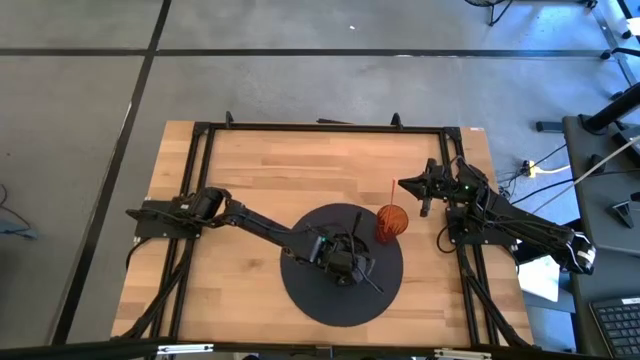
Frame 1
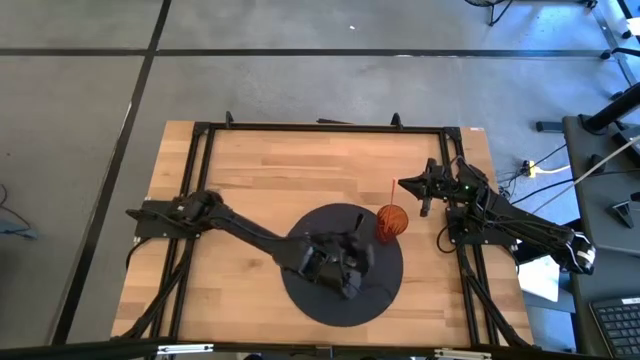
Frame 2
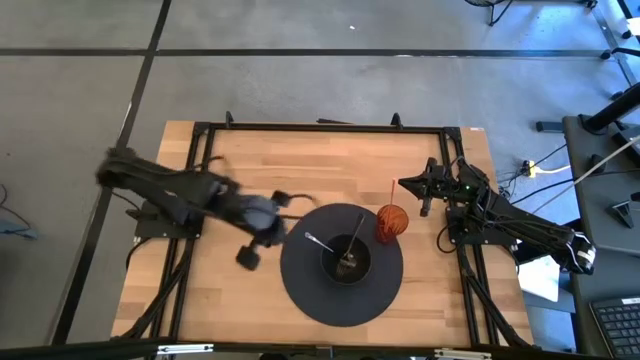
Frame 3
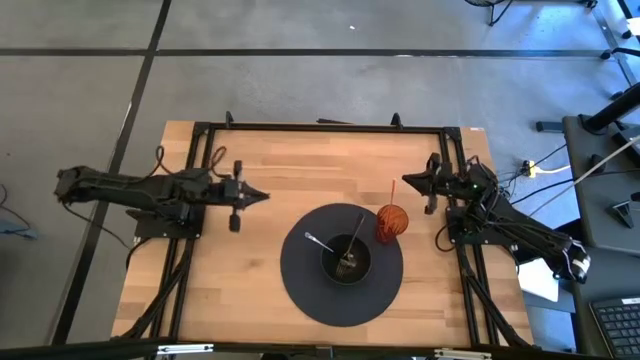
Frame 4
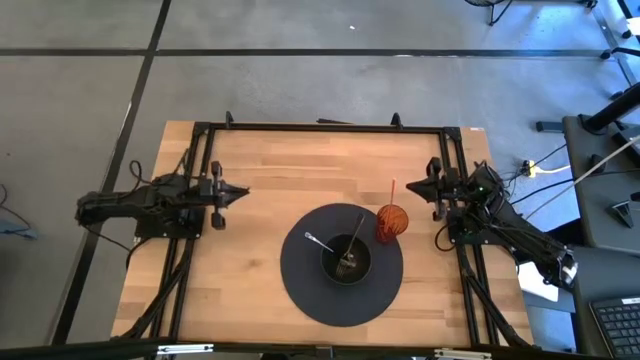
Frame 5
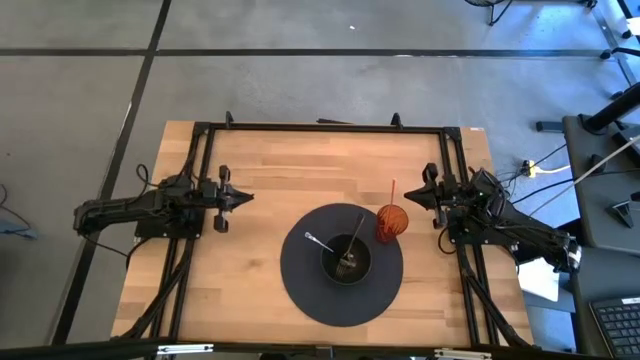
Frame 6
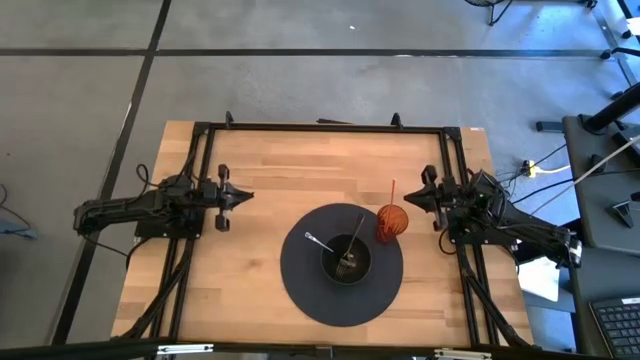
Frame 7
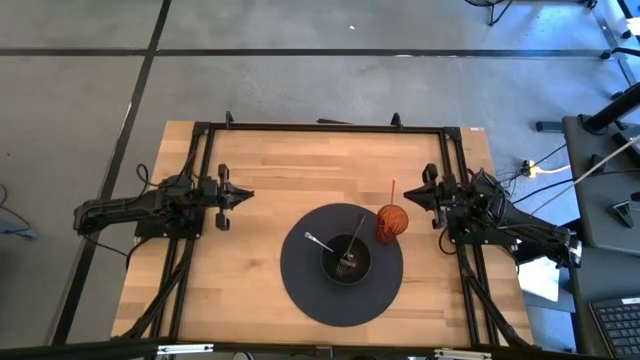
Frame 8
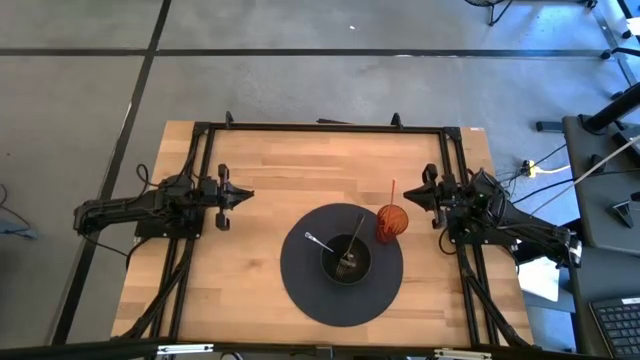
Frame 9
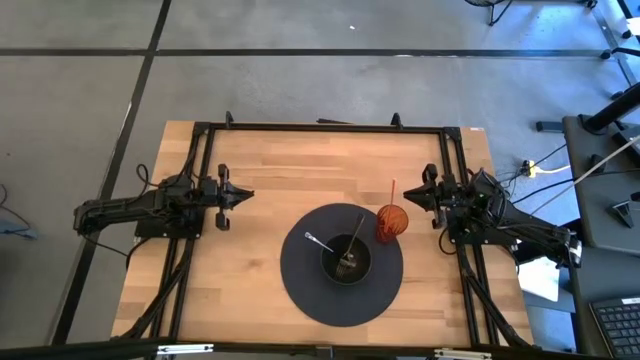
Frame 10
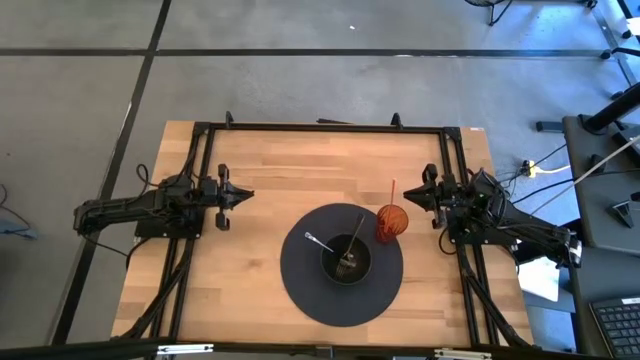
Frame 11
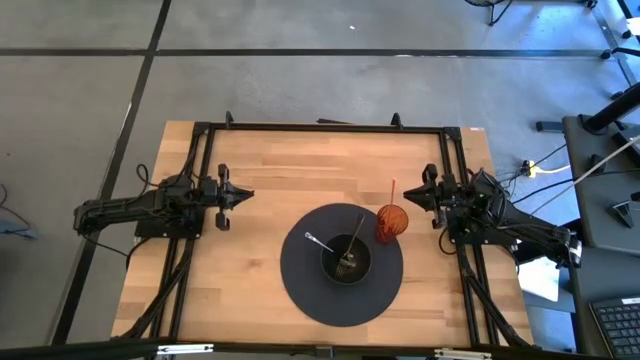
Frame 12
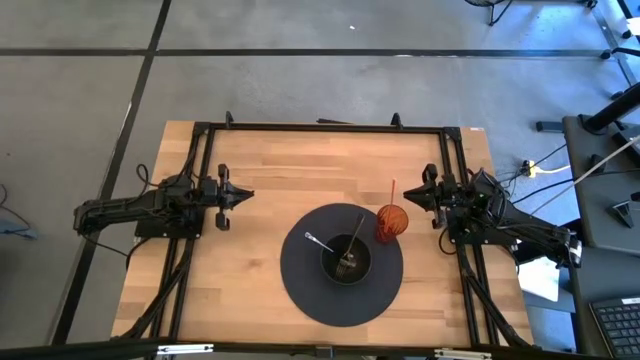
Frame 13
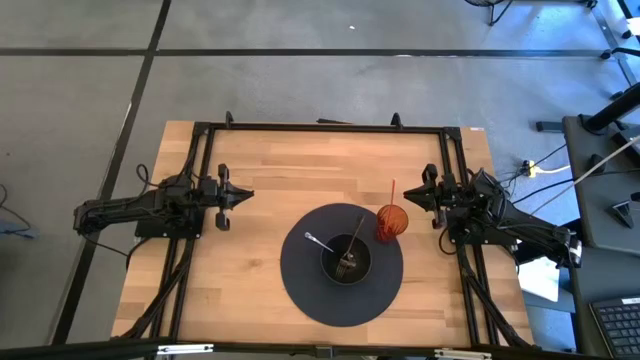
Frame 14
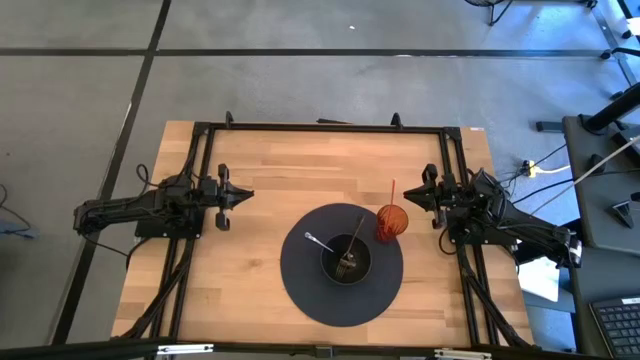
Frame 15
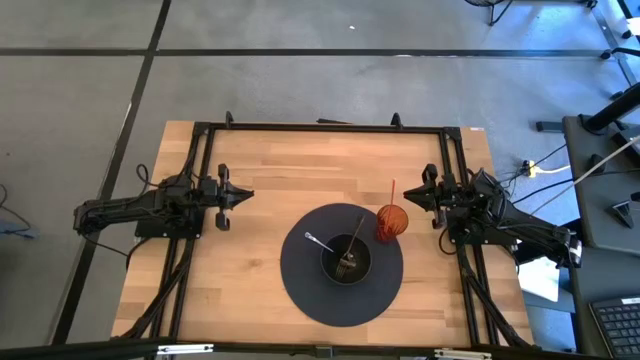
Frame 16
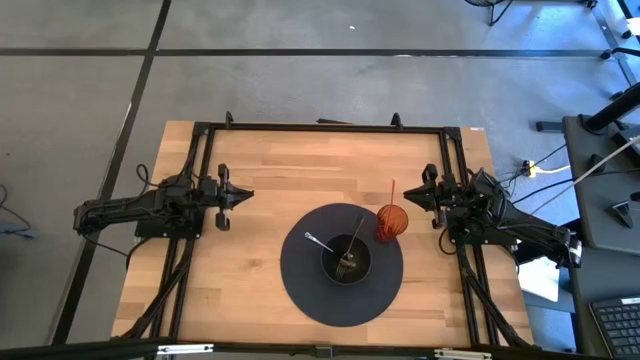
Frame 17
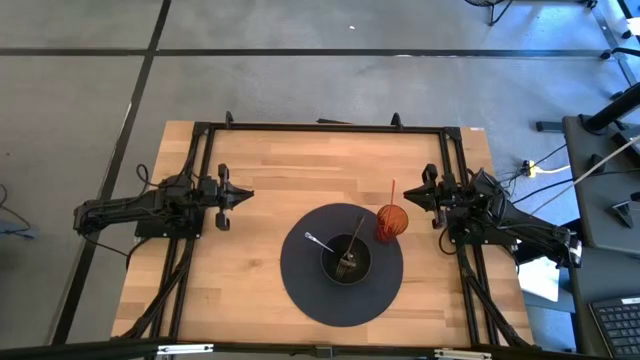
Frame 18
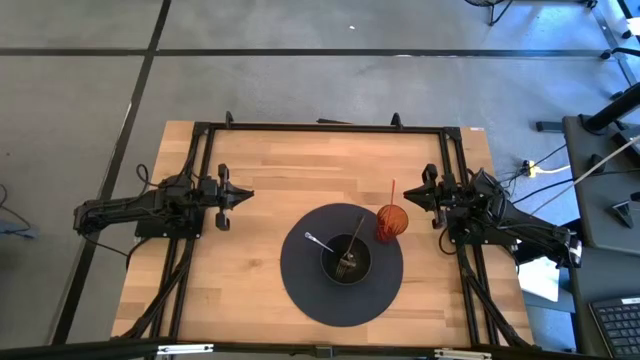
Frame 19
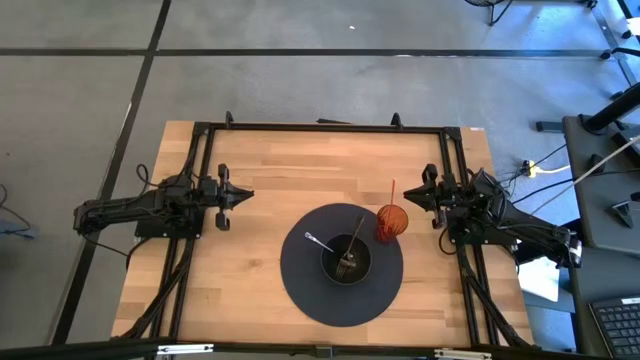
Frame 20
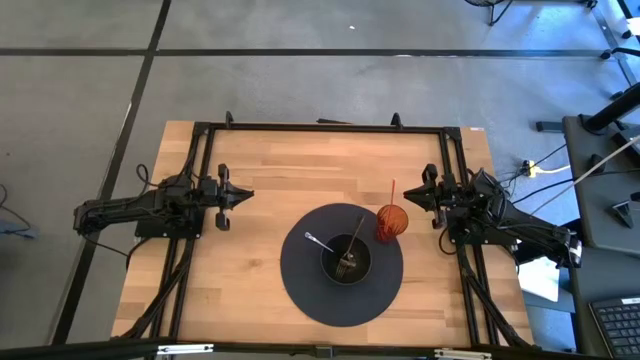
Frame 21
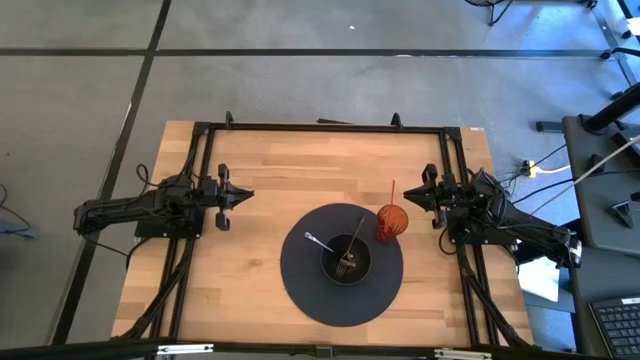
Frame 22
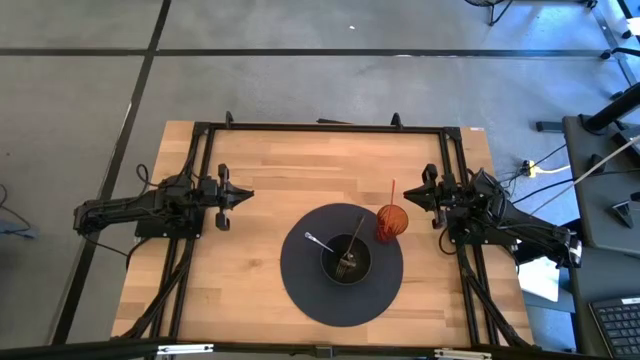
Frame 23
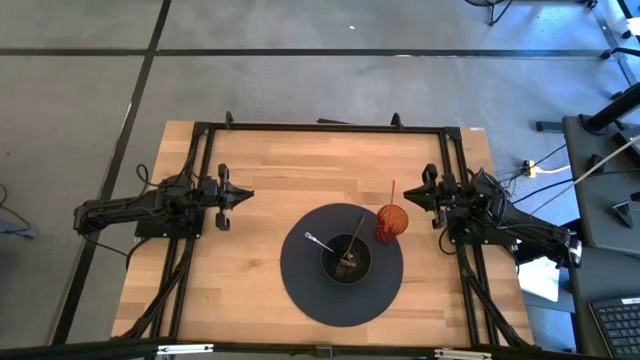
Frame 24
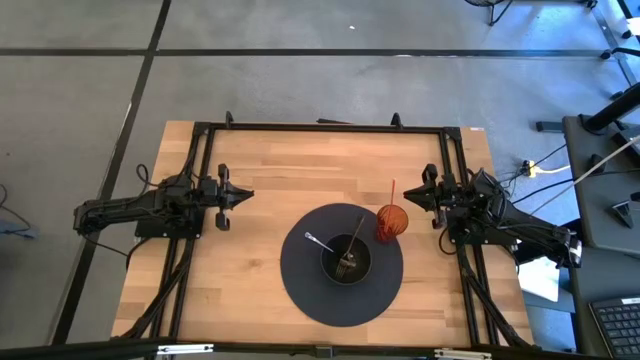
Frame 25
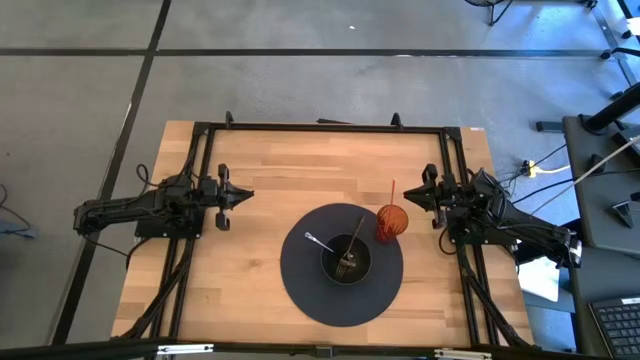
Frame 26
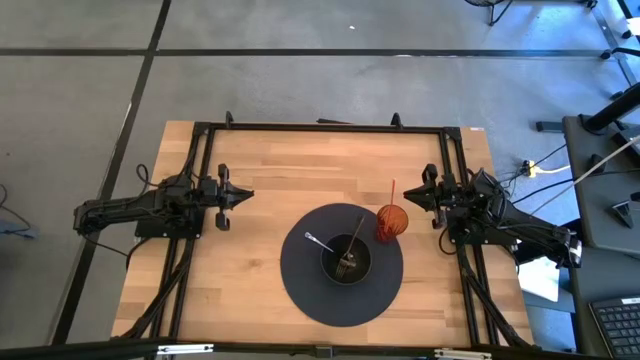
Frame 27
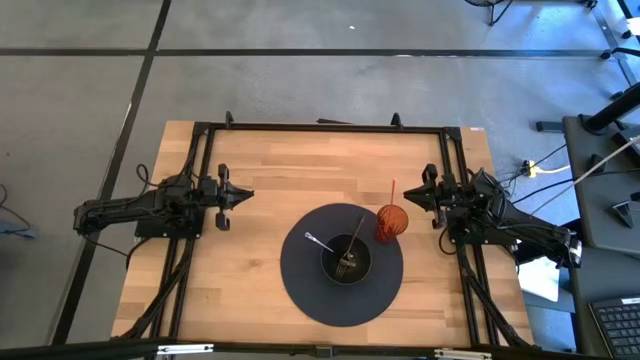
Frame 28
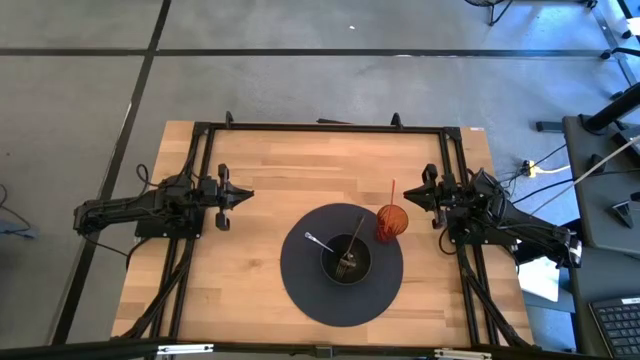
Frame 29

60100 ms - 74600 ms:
Task: Pick & Place Utensil
Return to Home Position

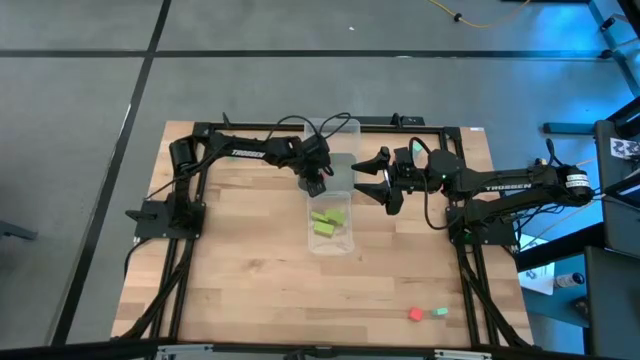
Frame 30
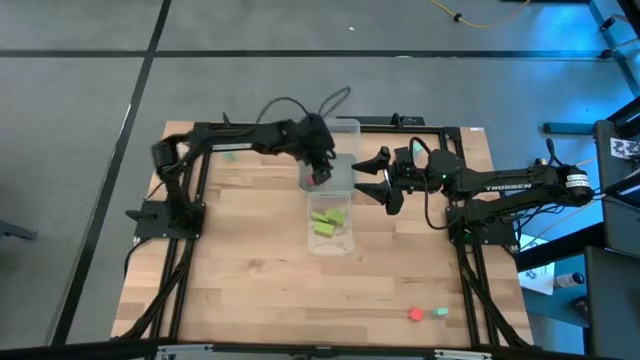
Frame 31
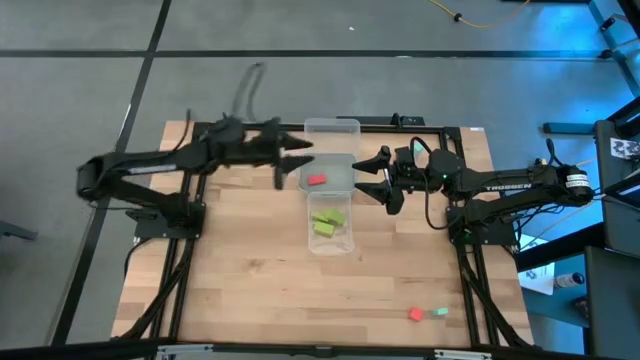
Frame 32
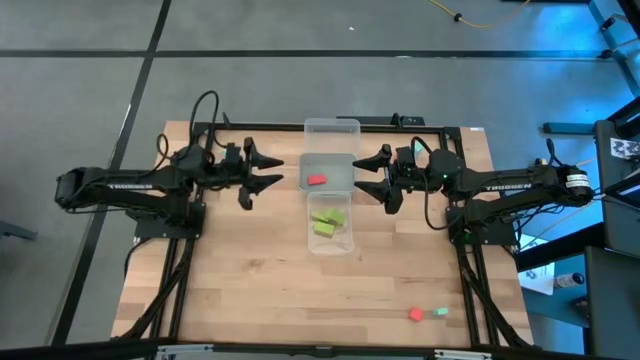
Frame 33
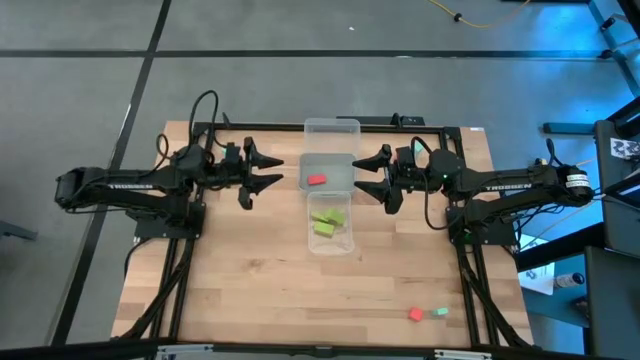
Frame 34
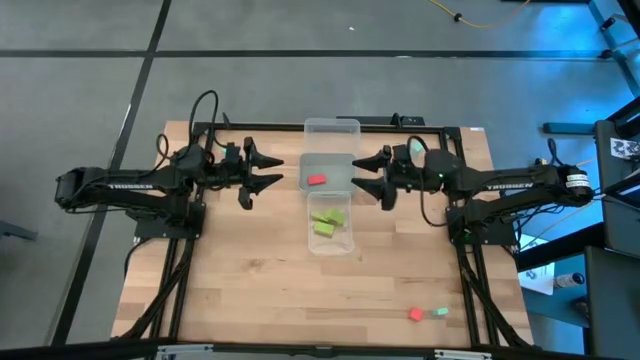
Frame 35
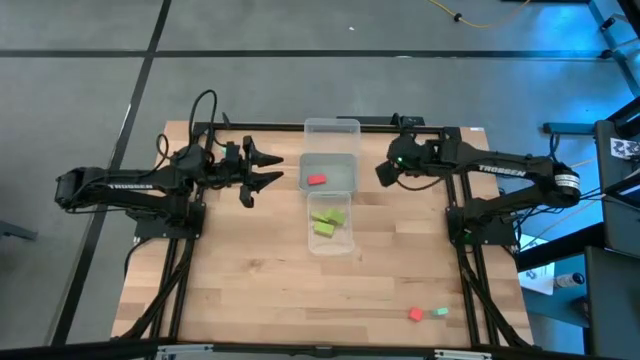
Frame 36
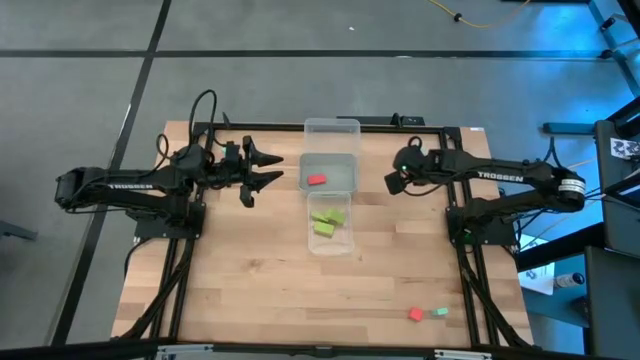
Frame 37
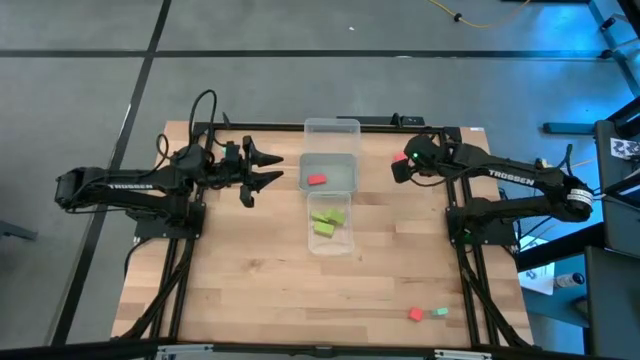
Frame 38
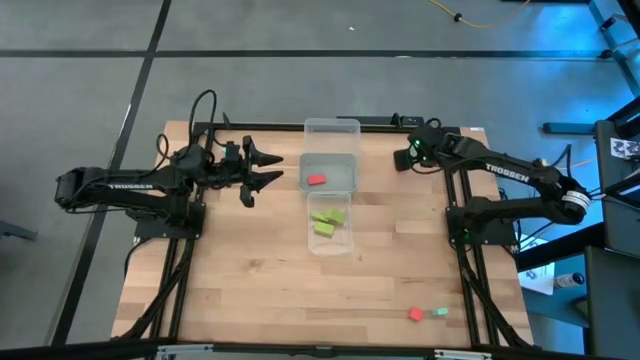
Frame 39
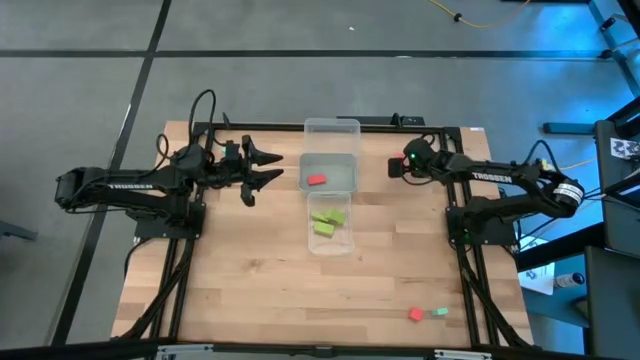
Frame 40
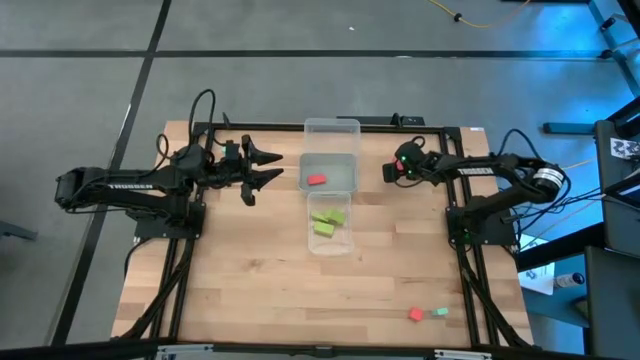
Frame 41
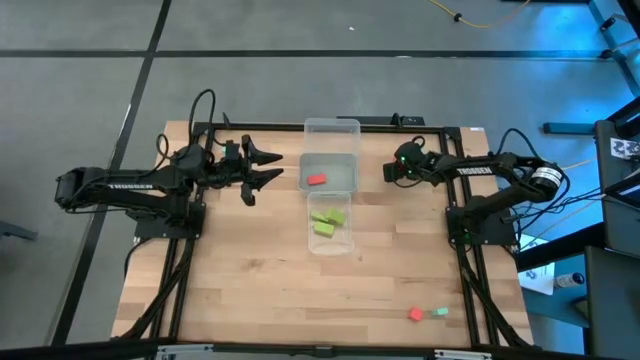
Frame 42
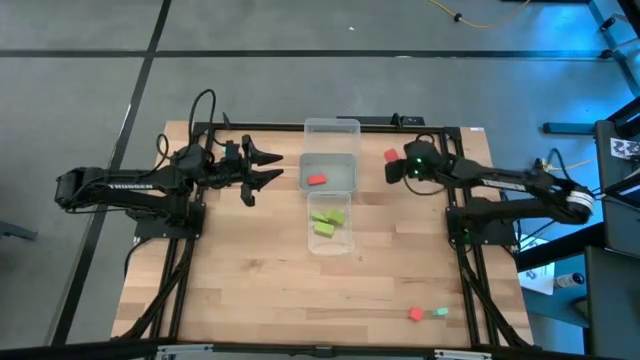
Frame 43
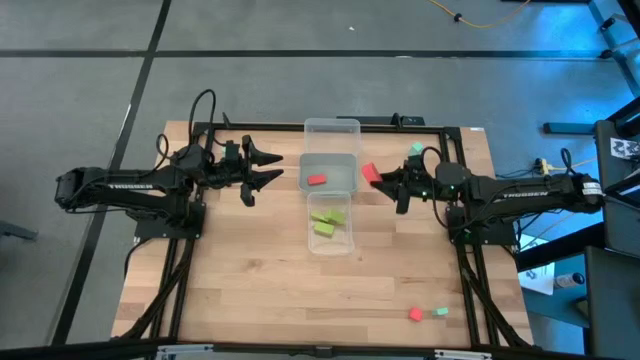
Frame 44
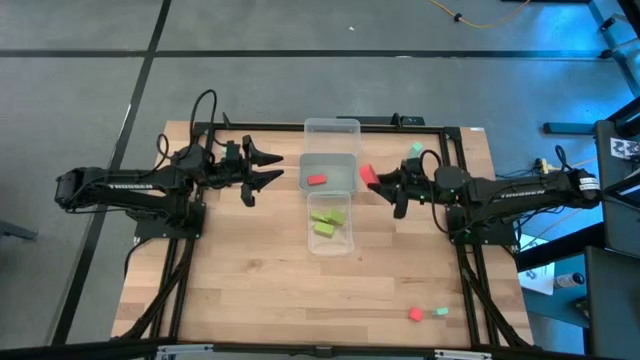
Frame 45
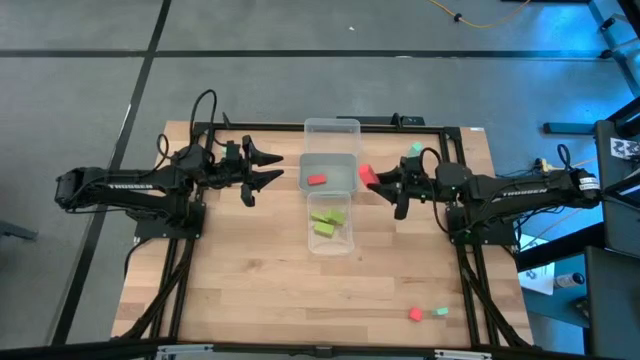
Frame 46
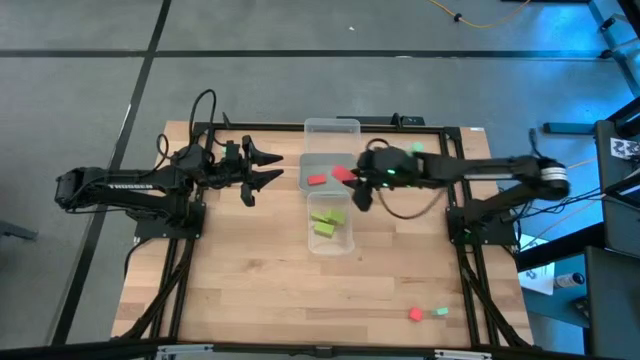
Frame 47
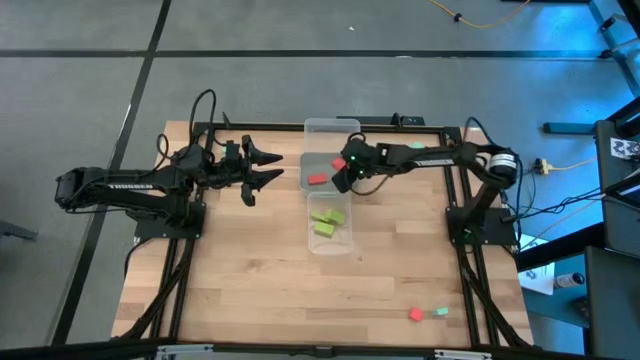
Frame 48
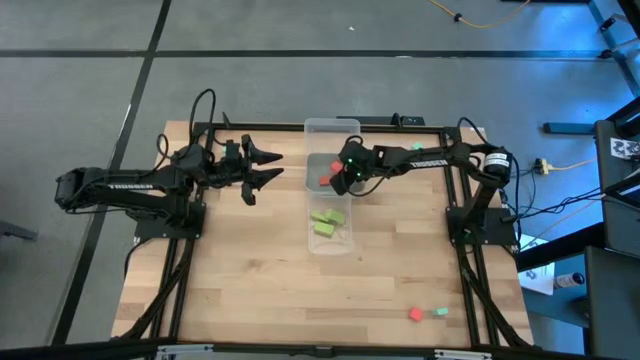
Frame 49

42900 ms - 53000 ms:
Task: Sort & place blocks by color
Put the top orange block into the gray bin
